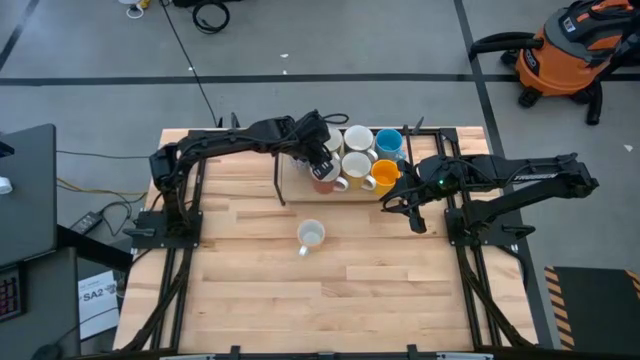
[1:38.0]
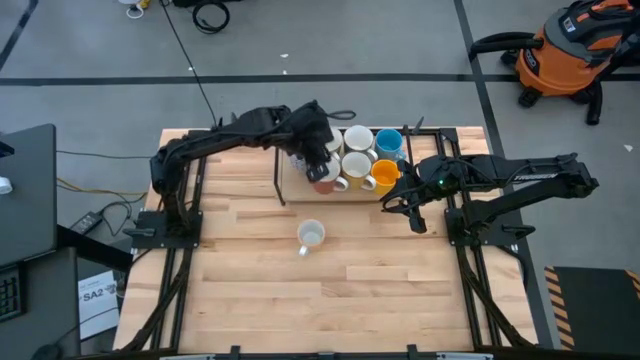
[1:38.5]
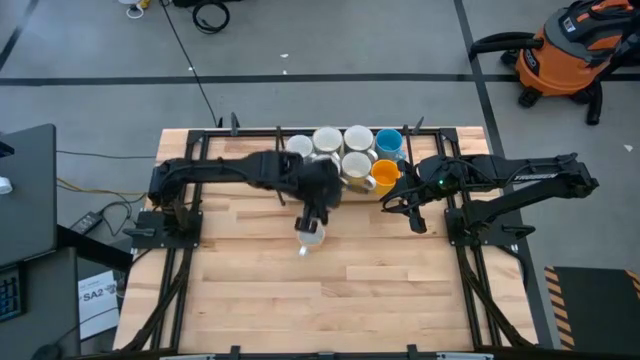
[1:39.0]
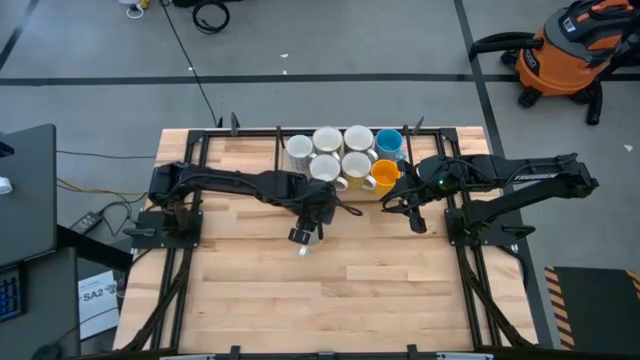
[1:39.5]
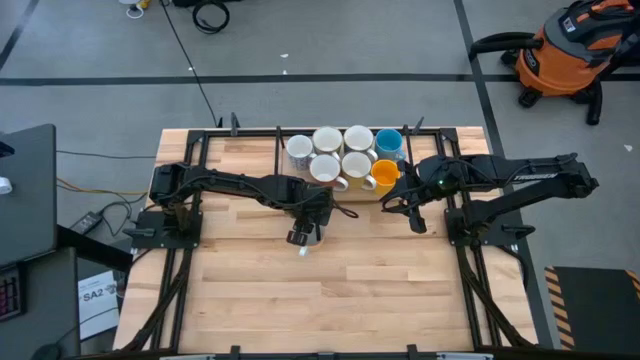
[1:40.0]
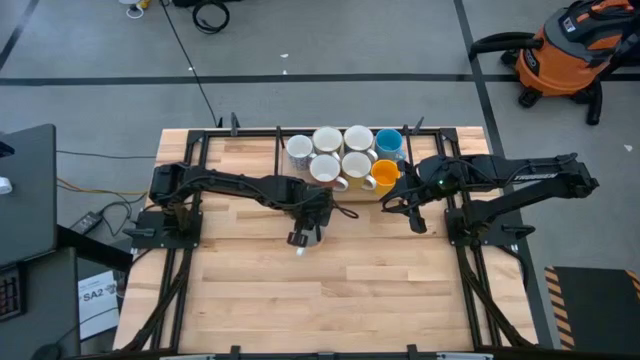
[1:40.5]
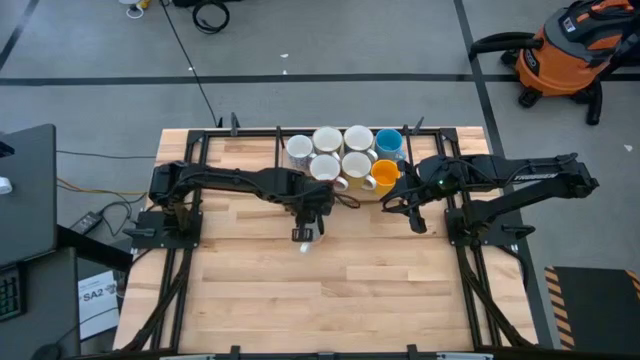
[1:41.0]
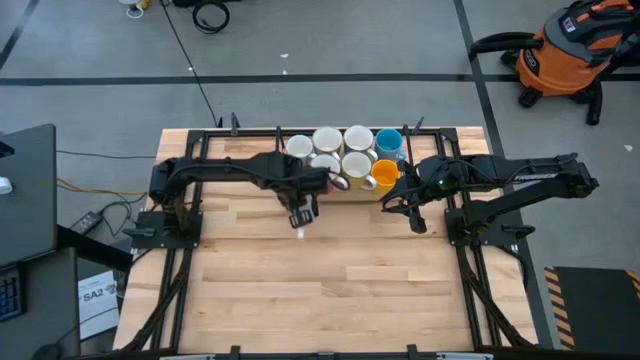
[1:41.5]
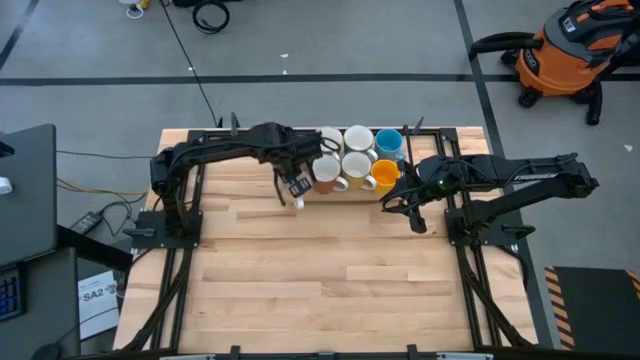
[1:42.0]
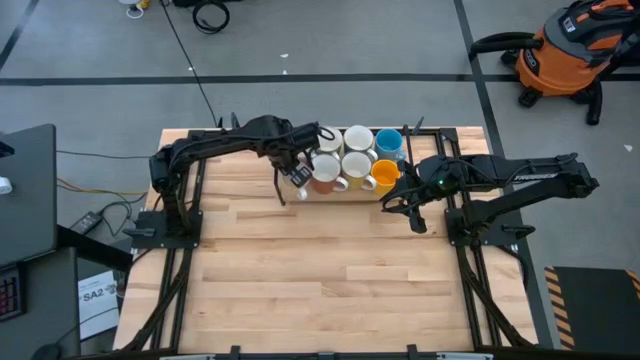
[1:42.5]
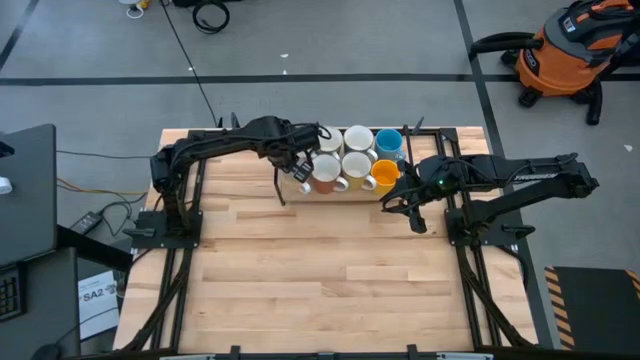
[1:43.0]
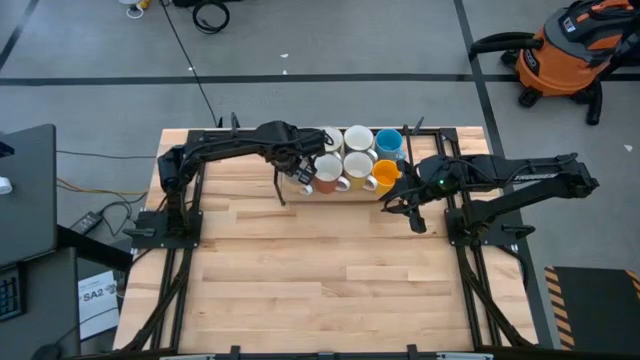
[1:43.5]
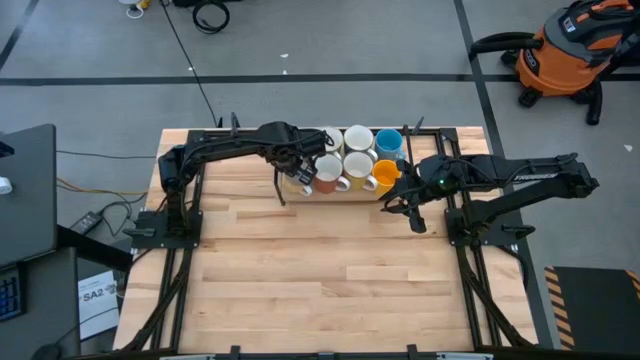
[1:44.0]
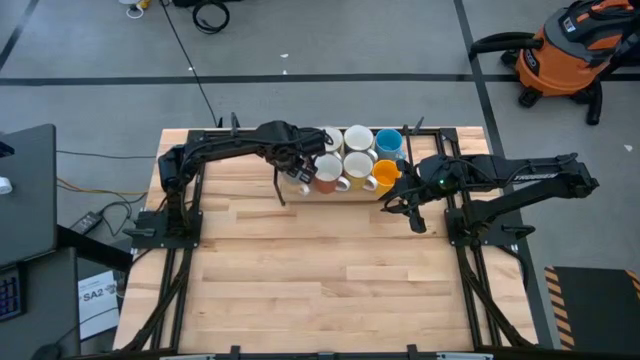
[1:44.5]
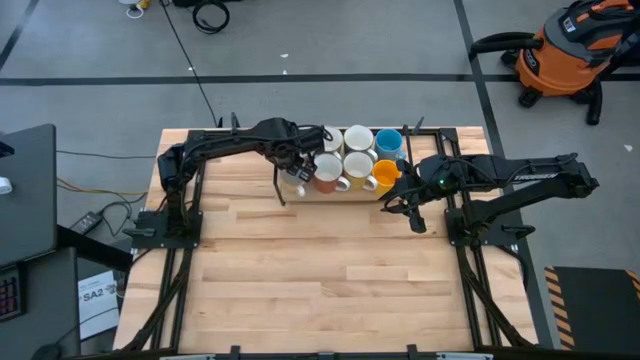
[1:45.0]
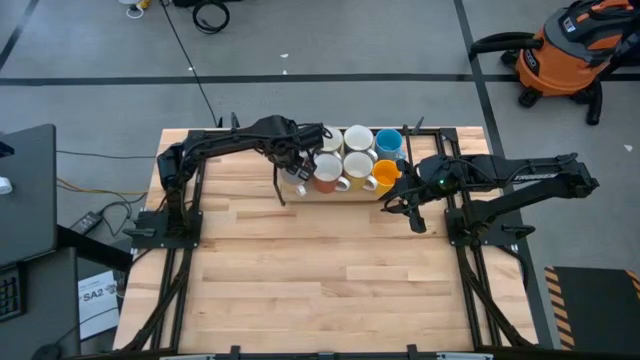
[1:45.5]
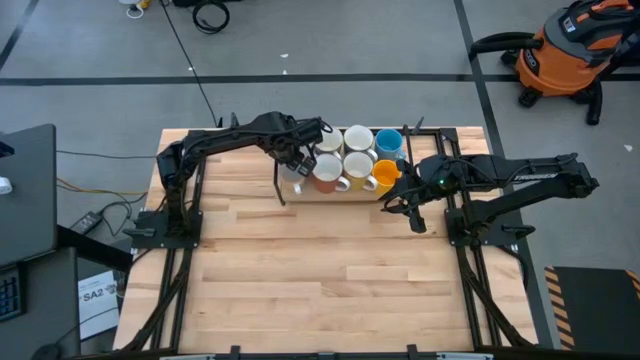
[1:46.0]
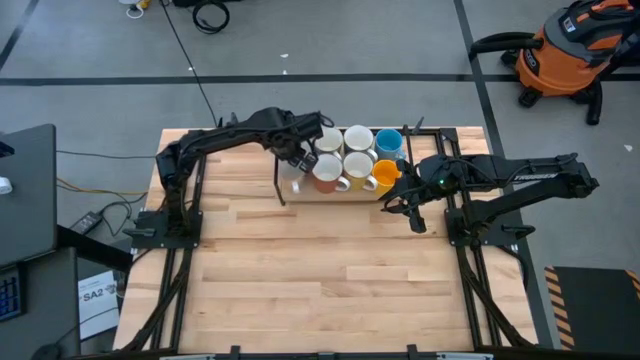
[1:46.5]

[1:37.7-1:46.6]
Task: Place coffee mugs
Put the patterned yellow mug on the shelf

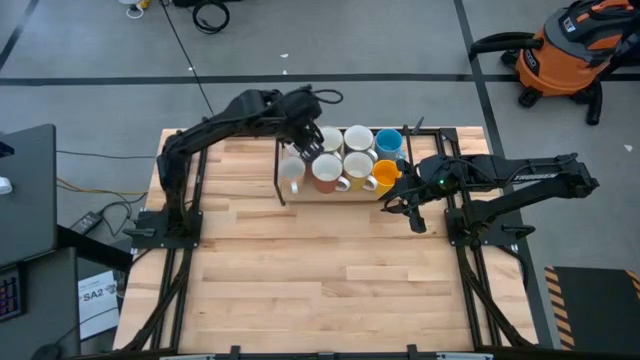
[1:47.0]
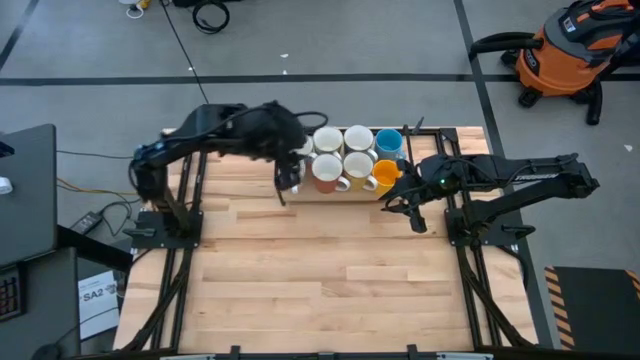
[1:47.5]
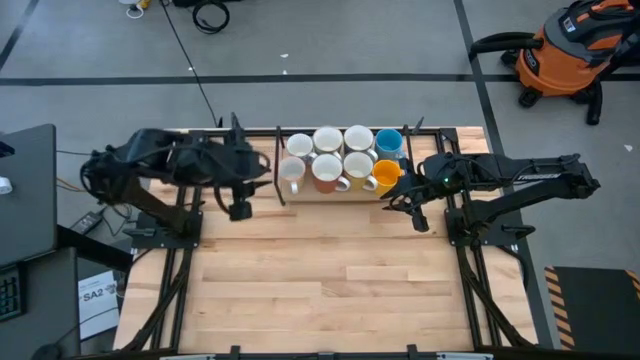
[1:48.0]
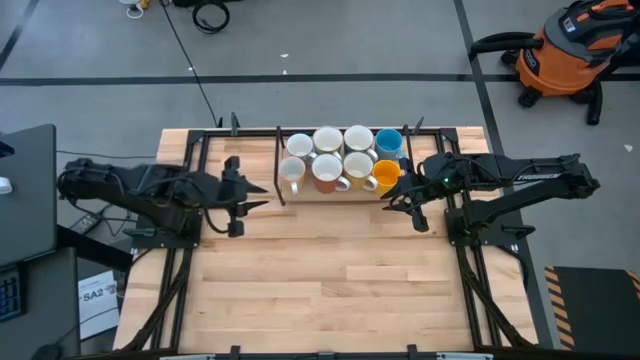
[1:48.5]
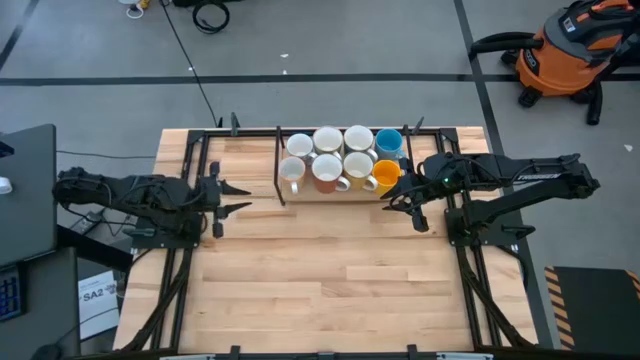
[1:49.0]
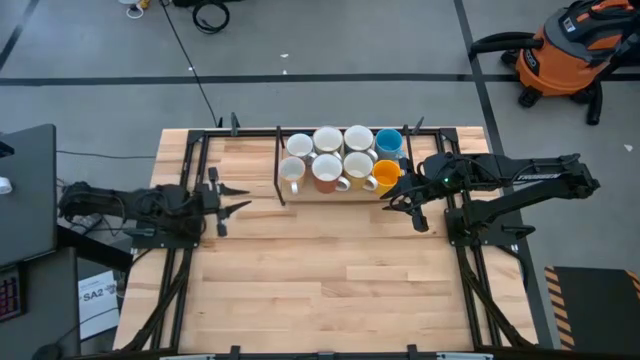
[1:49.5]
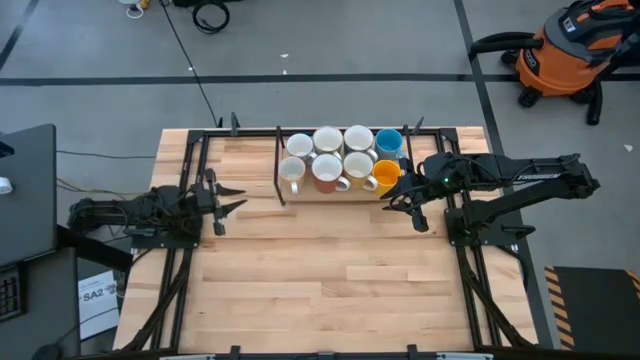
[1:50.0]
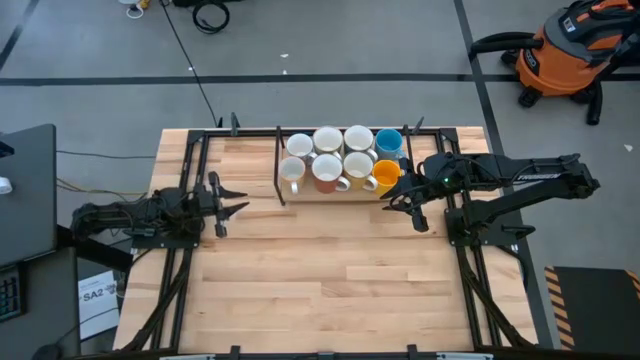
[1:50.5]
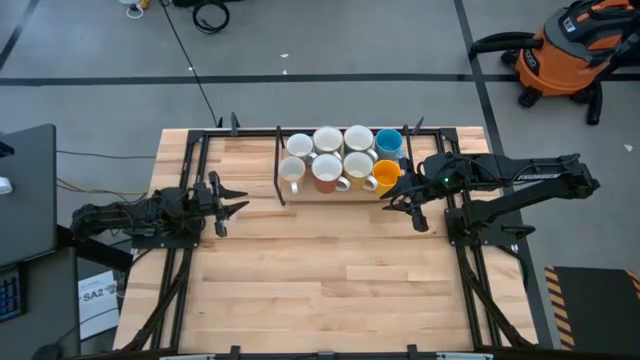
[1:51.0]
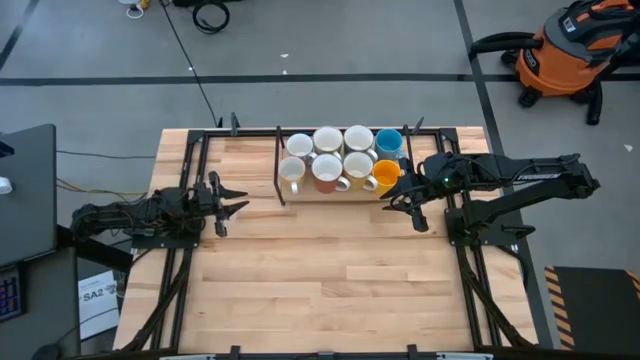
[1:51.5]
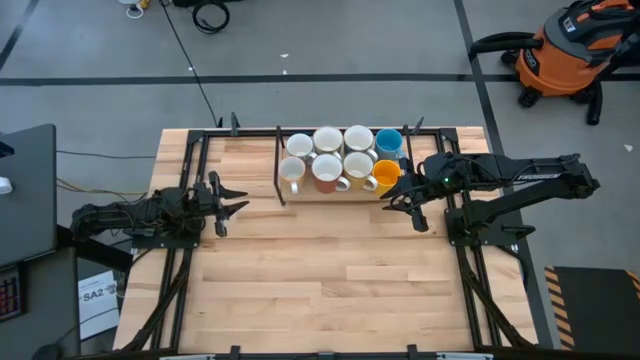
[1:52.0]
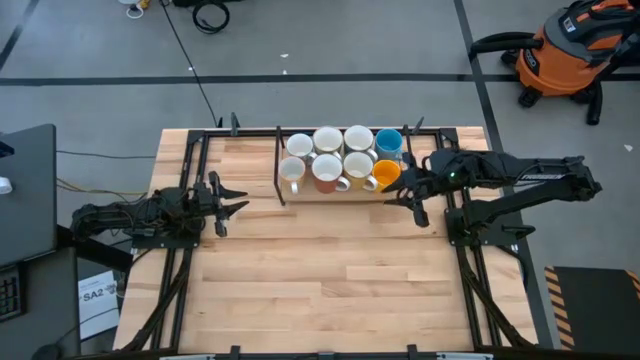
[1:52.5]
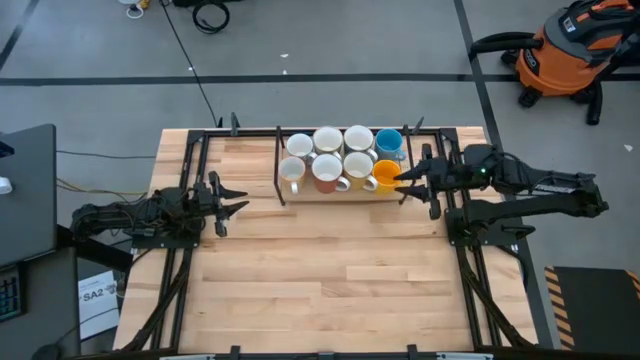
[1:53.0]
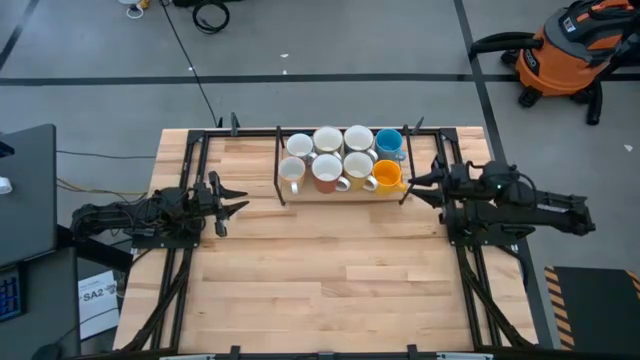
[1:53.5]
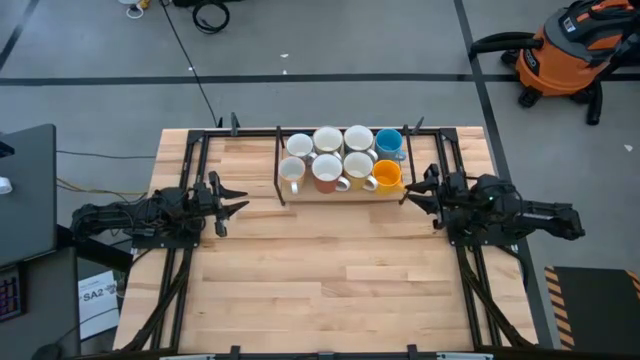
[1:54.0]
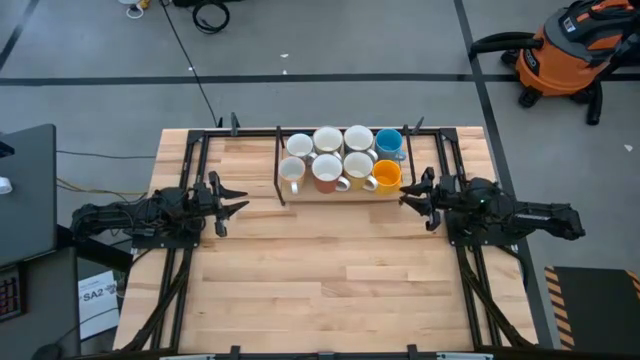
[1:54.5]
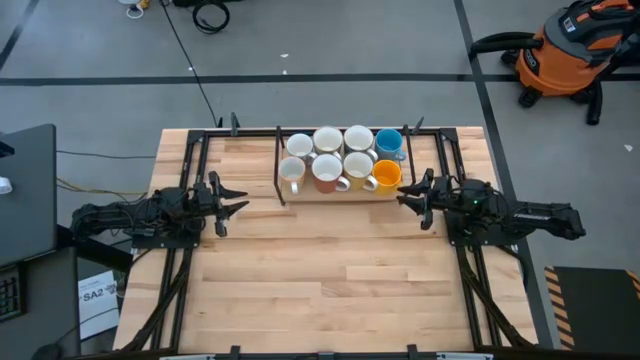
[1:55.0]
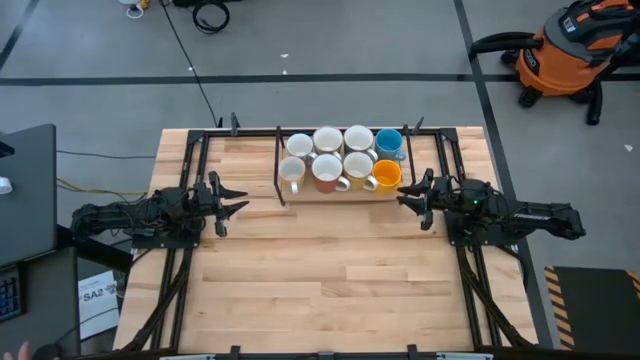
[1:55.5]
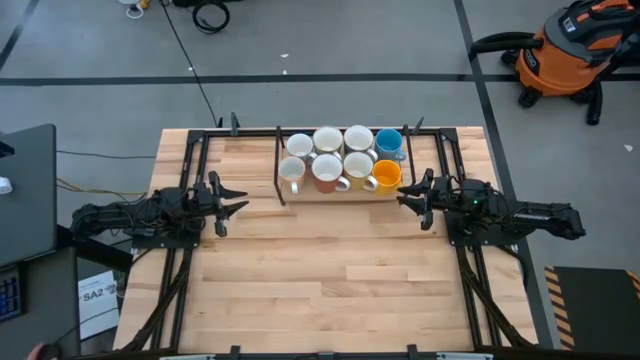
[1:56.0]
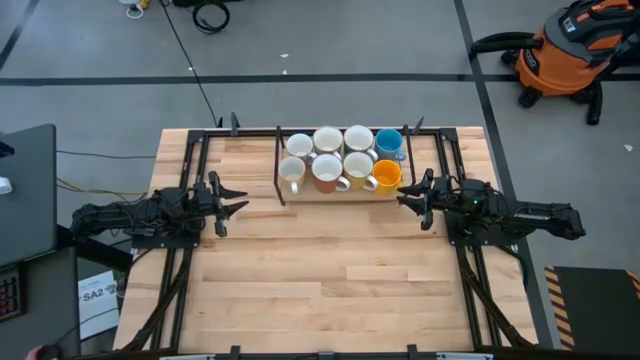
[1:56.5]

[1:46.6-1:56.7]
Return to Home Position

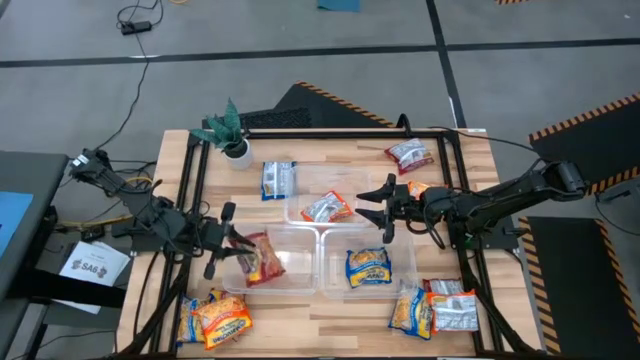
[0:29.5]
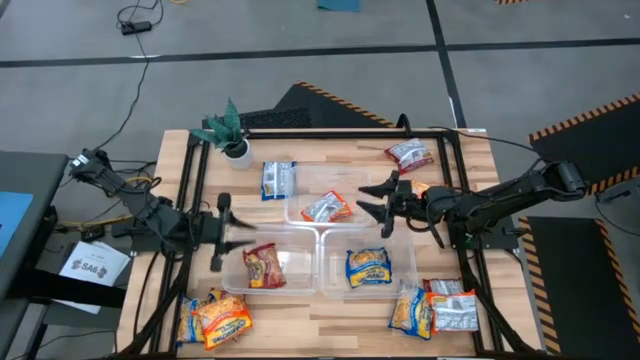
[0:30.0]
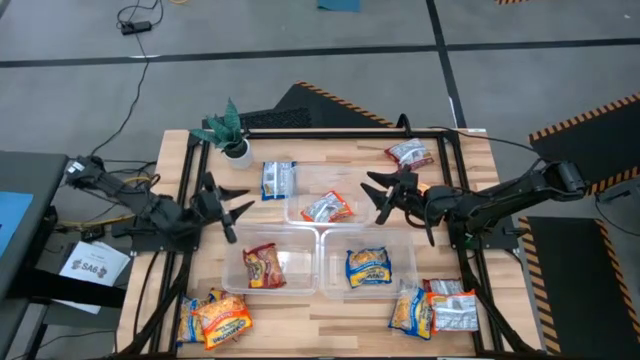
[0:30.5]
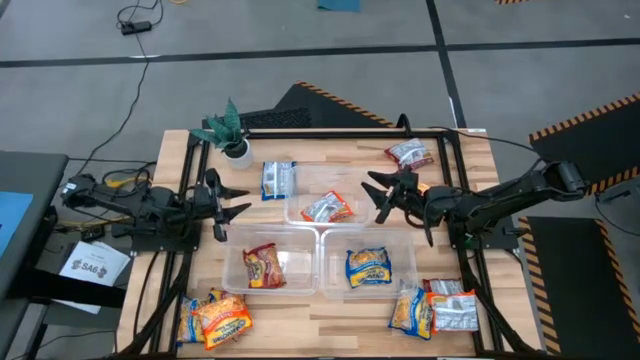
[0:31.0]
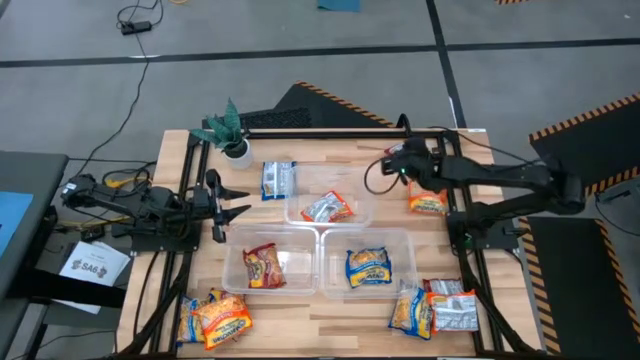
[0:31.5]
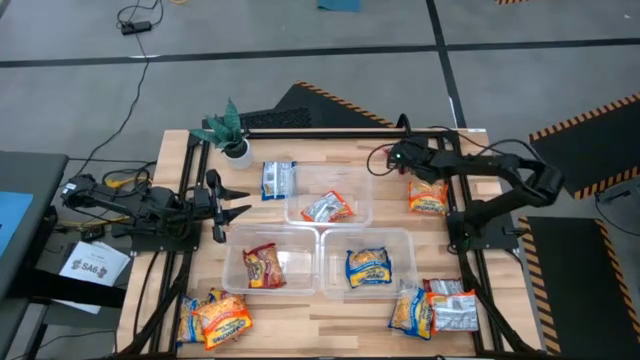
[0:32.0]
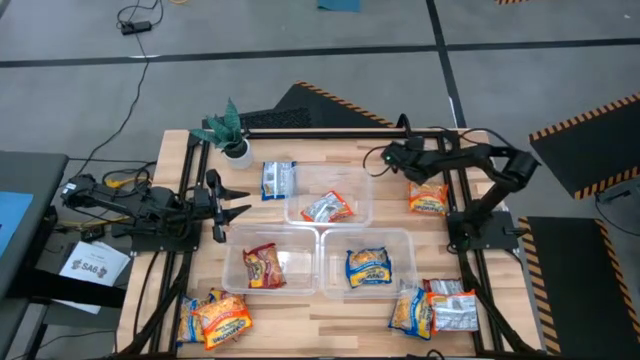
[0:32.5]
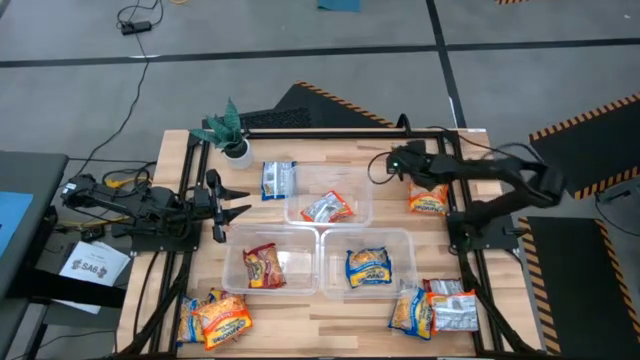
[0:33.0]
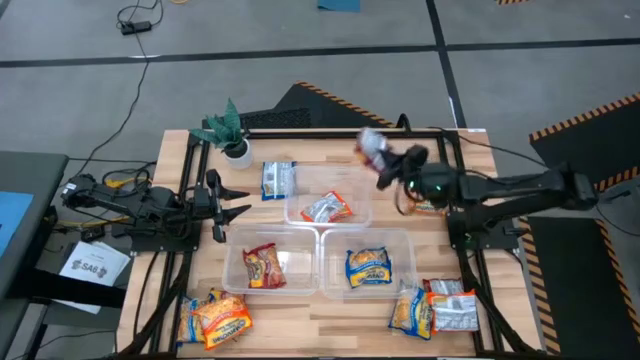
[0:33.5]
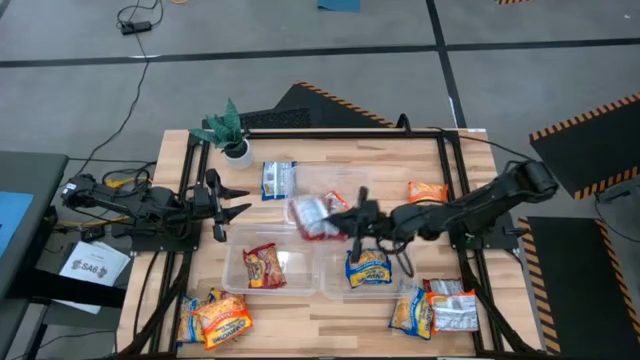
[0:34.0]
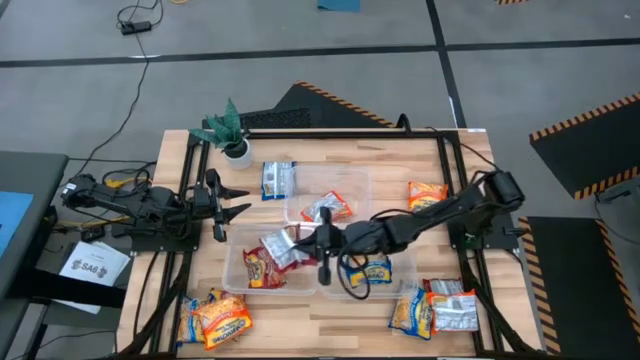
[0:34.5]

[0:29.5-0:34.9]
Task: Sort Maruchan noodles
Put the red noodle pack into the bottom left transparent bin
